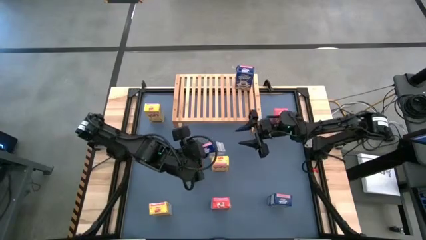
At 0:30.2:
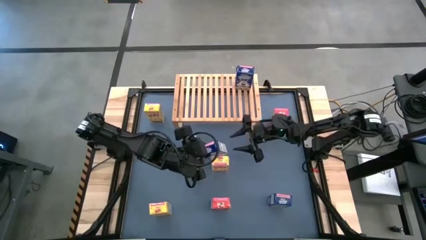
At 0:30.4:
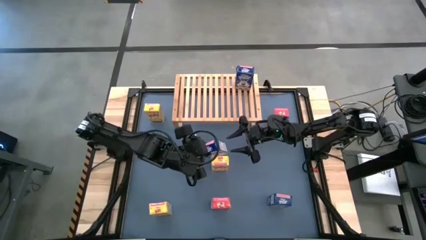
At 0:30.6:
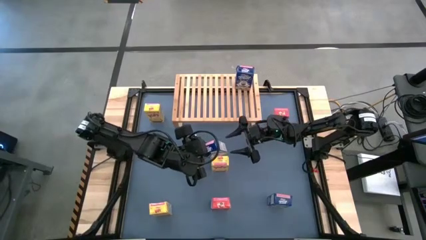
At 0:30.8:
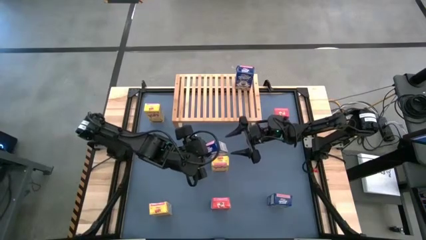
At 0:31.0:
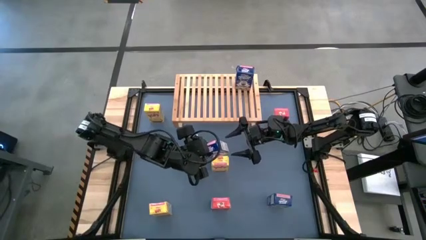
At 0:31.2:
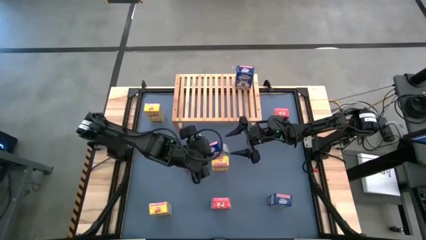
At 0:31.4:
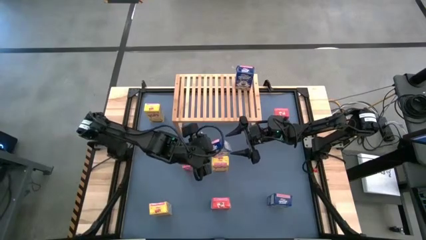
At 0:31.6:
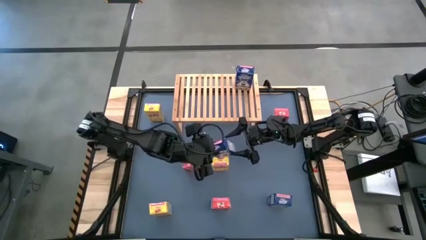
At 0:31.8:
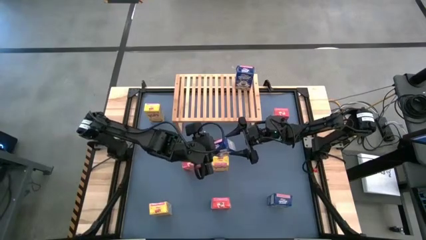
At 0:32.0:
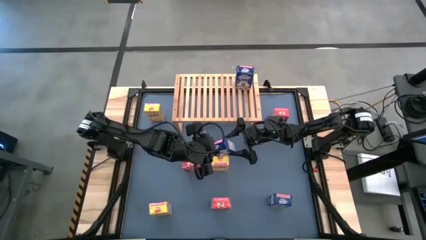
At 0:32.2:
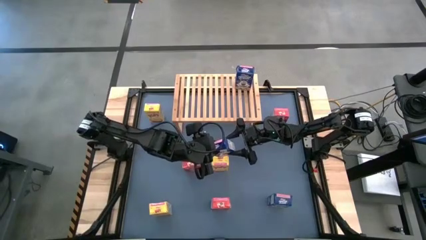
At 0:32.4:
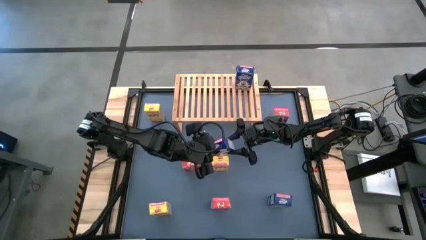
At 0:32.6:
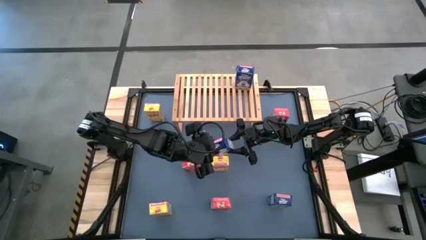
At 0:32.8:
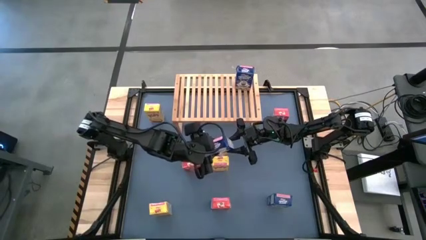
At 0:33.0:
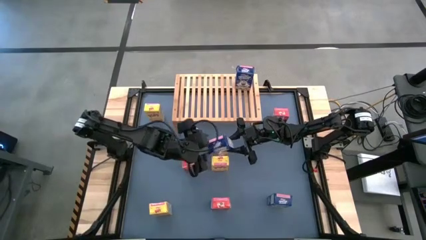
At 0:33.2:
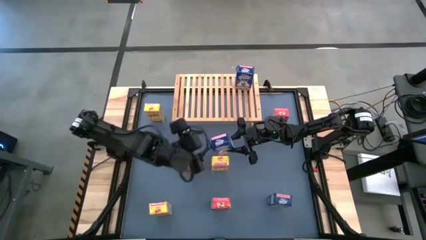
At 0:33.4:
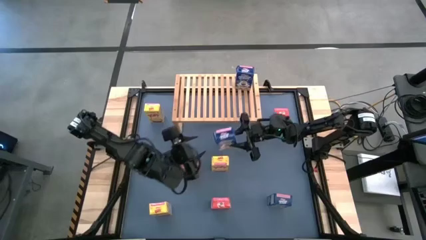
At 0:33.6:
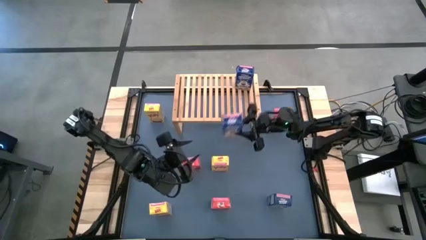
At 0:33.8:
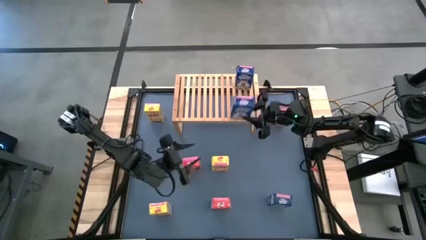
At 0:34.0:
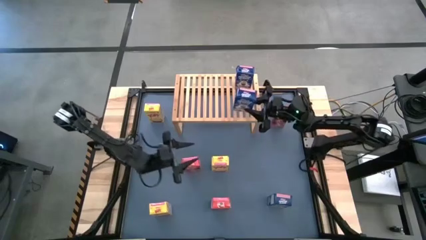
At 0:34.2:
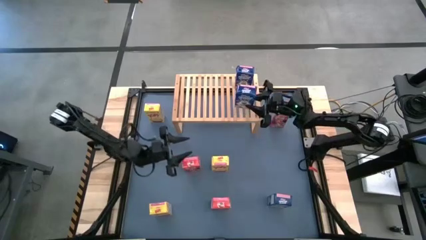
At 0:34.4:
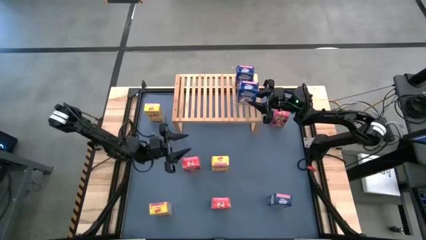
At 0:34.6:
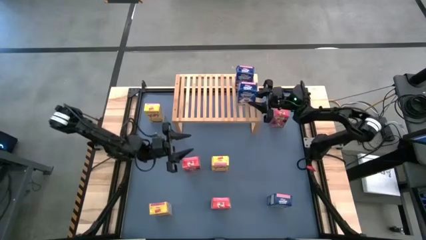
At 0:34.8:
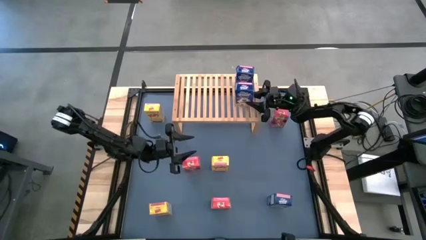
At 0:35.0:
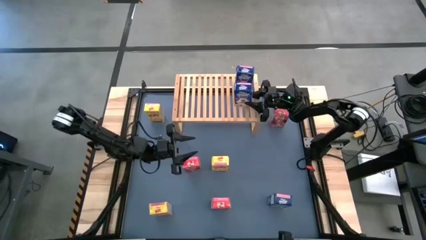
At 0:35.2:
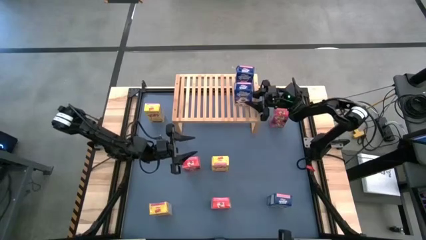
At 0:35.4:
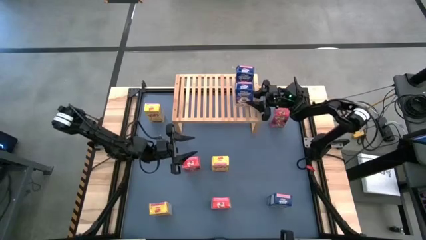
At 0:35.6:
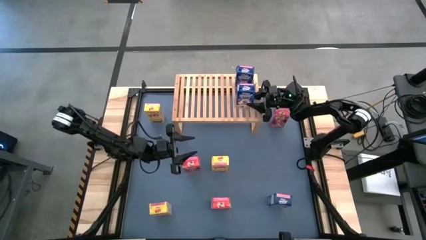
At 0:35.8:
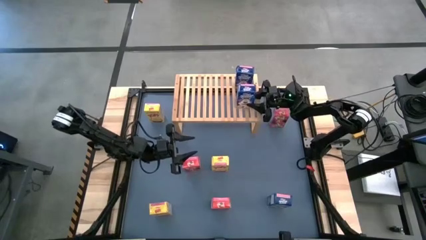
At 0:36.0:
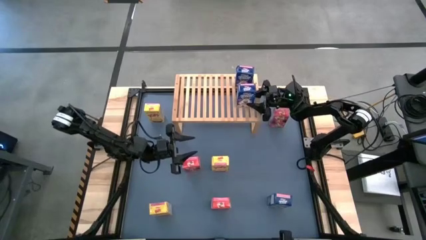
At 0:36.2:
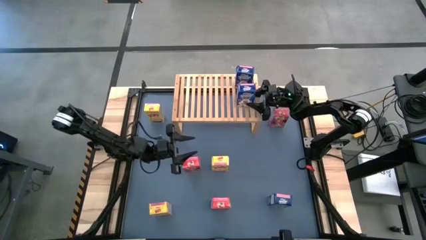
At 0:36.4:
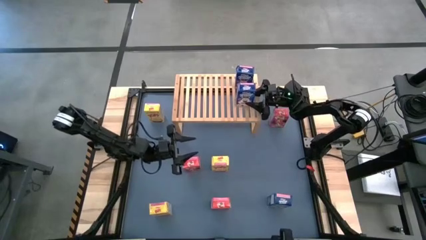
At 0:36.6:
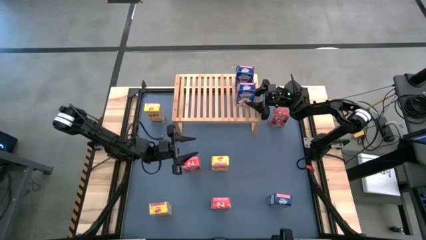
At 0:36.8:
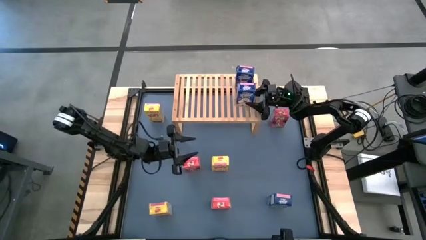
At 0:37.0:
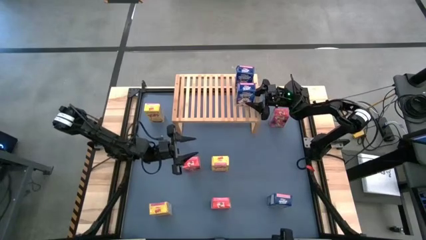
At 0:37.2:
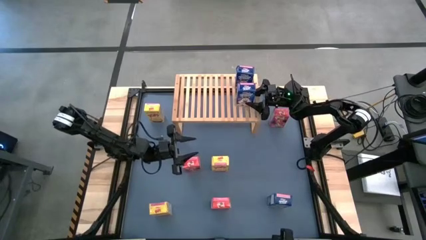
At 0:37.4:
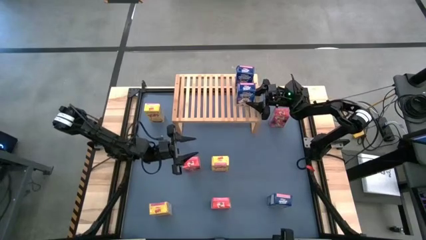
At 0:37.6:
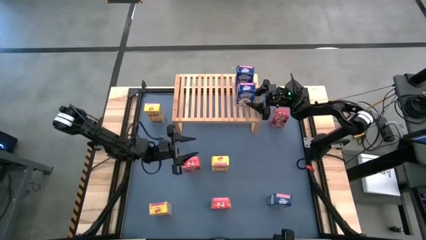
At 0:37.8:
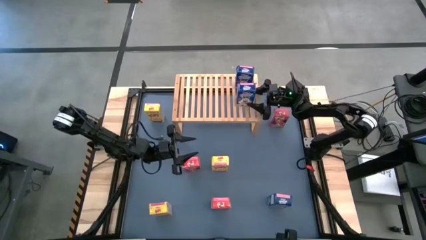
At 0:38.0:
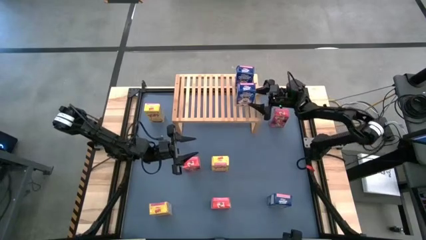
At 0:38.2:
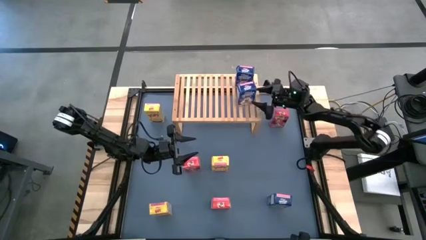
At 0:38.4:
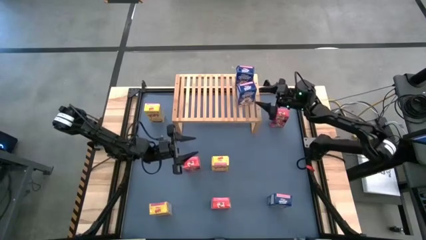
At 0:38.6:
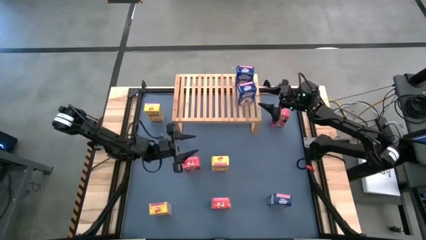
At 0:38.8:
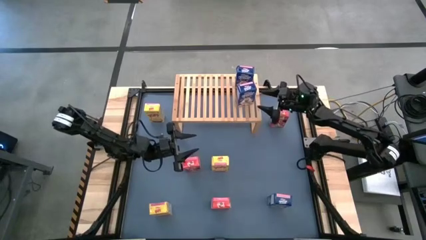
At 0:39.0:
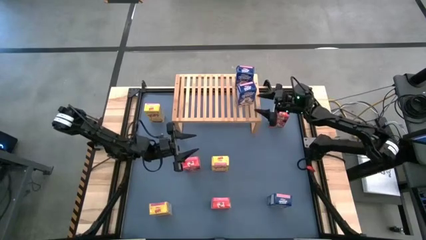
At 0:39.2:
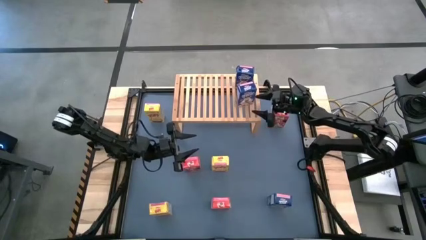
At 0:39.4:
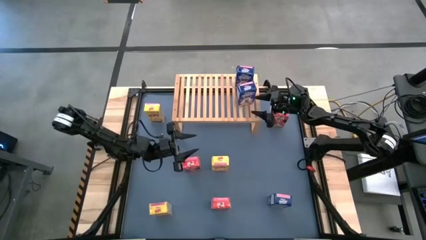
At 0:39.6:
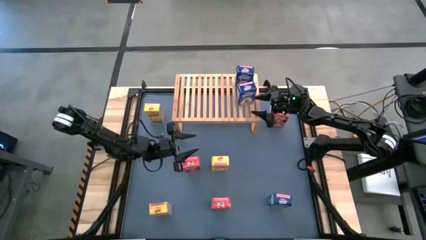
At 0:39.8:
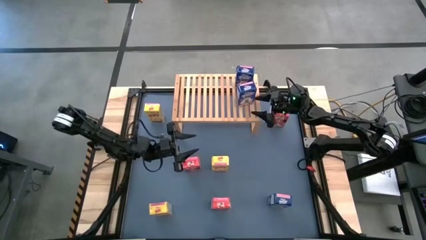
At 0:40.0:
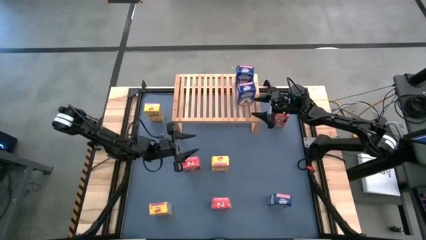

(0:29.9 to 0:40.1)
Task: Stack cereal on shelf
Put the left blue cereal box on the shelf aligned with the other blue cereal box

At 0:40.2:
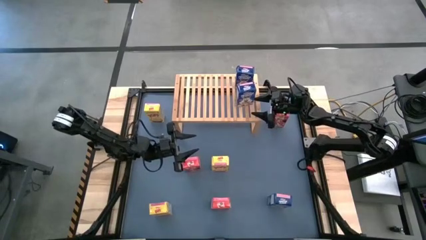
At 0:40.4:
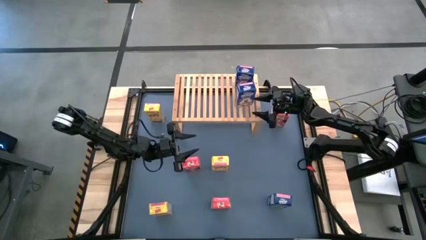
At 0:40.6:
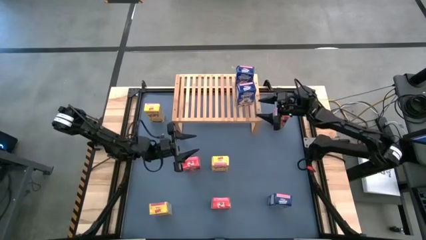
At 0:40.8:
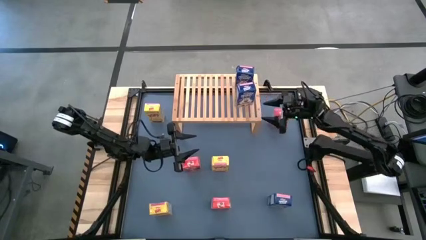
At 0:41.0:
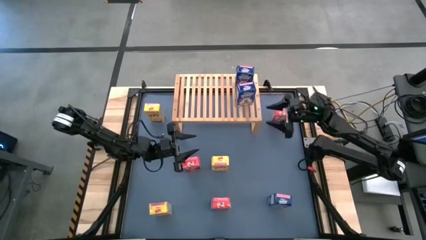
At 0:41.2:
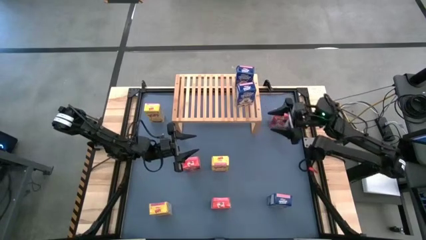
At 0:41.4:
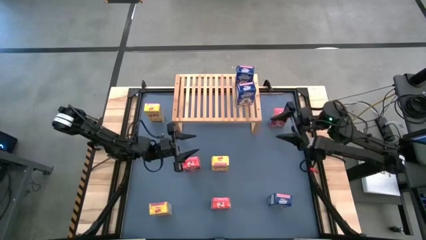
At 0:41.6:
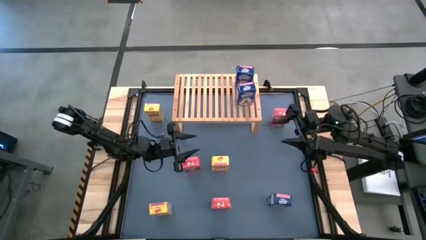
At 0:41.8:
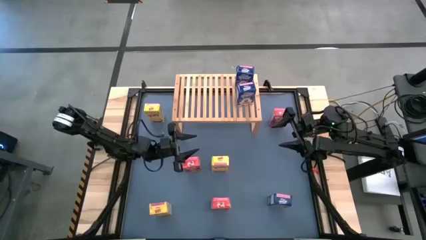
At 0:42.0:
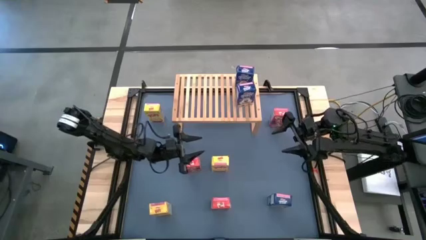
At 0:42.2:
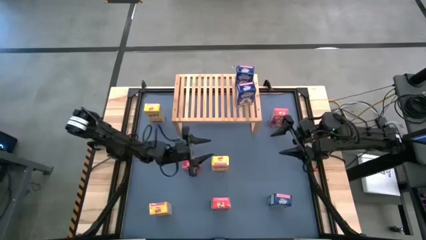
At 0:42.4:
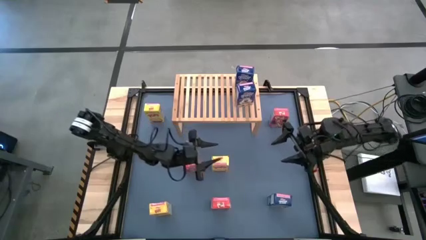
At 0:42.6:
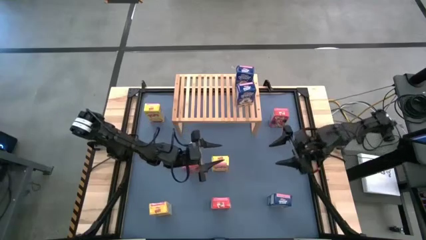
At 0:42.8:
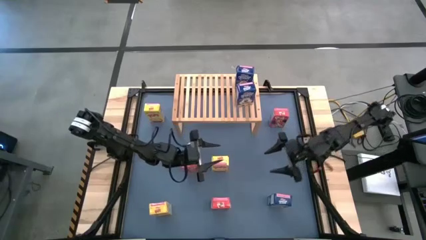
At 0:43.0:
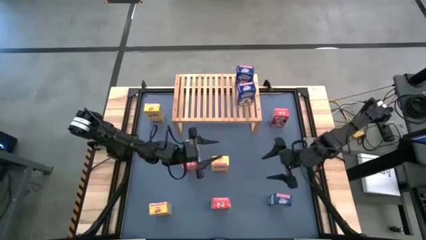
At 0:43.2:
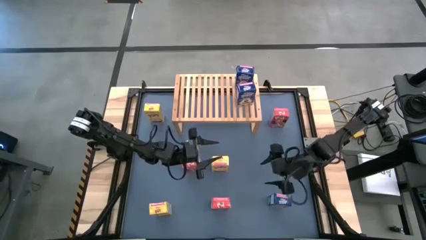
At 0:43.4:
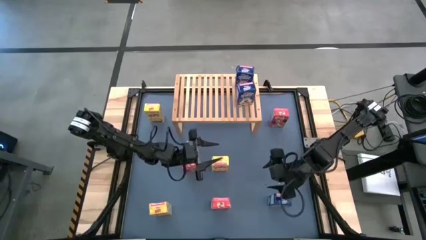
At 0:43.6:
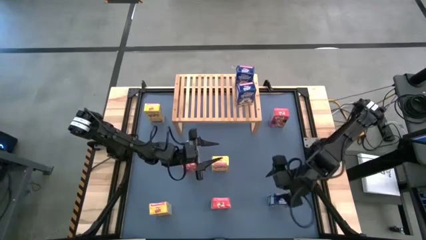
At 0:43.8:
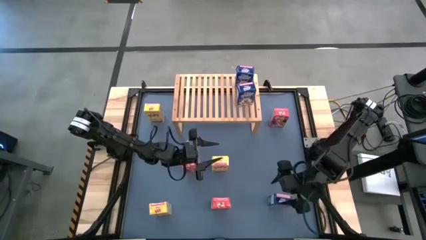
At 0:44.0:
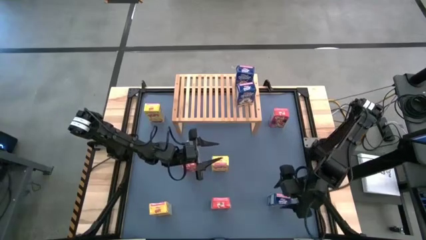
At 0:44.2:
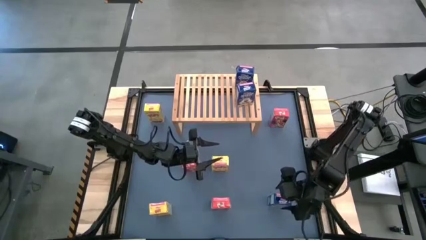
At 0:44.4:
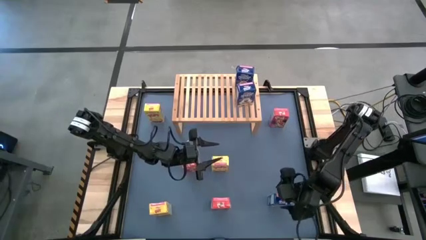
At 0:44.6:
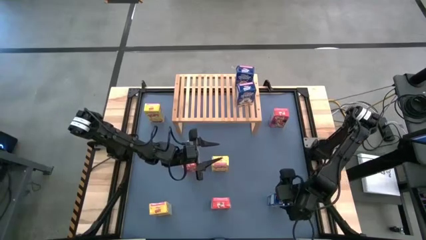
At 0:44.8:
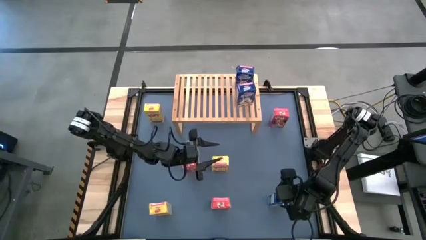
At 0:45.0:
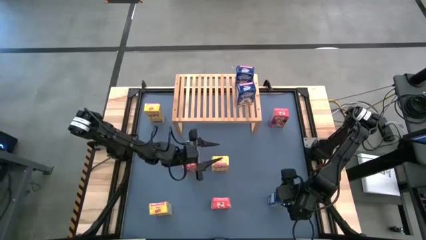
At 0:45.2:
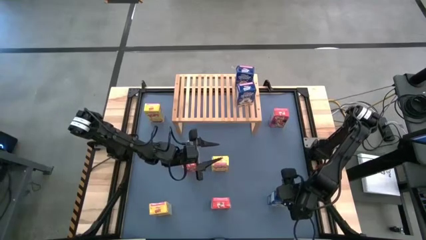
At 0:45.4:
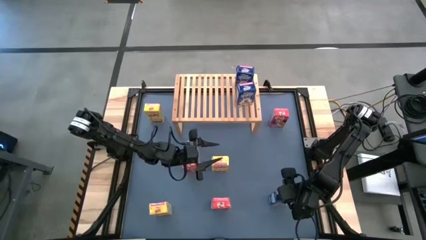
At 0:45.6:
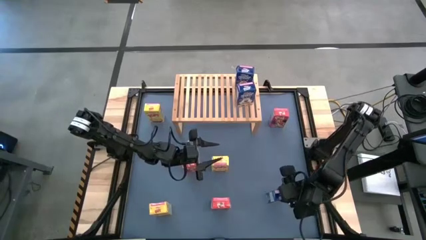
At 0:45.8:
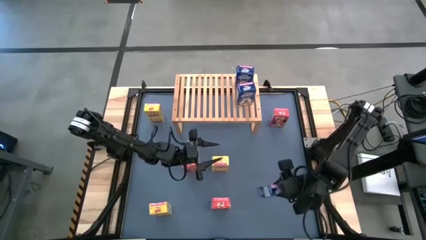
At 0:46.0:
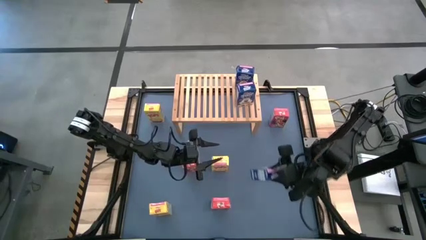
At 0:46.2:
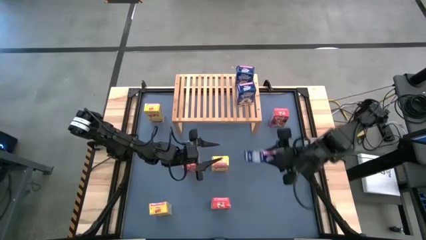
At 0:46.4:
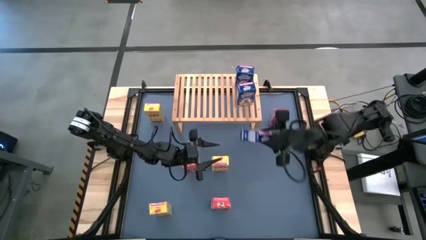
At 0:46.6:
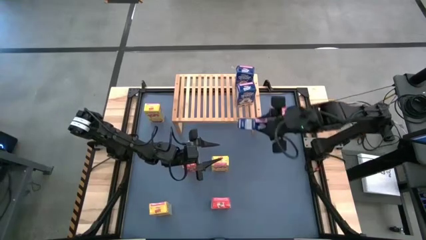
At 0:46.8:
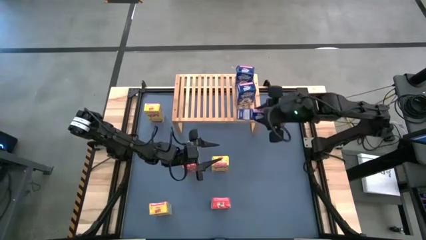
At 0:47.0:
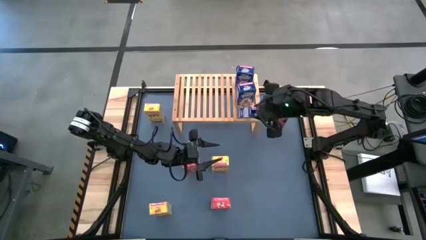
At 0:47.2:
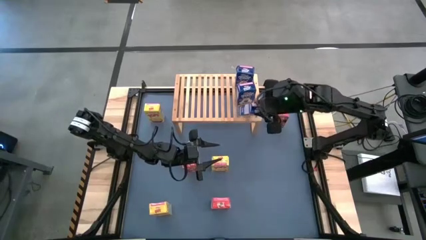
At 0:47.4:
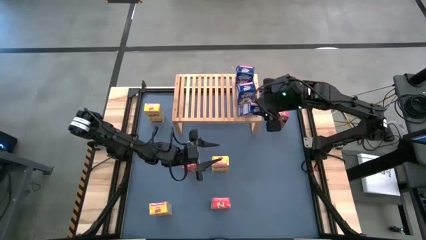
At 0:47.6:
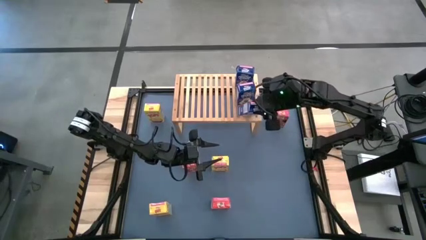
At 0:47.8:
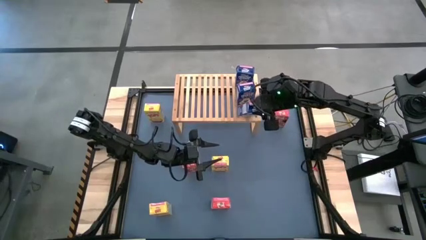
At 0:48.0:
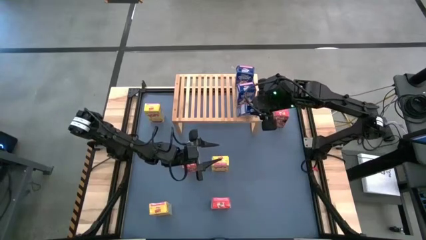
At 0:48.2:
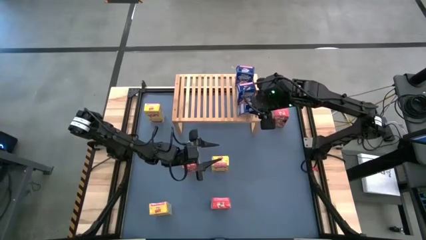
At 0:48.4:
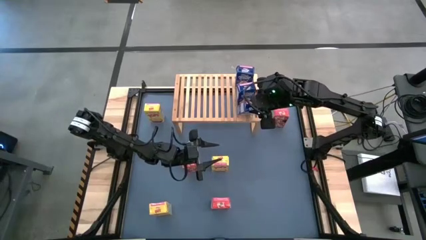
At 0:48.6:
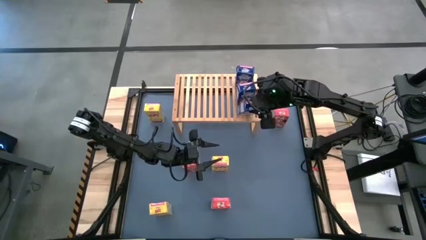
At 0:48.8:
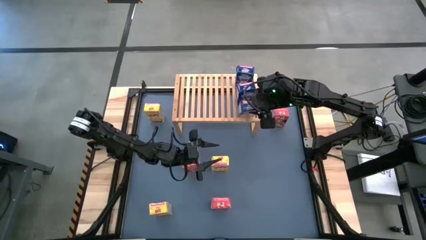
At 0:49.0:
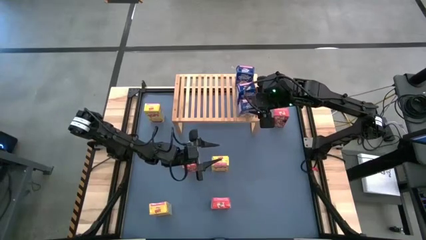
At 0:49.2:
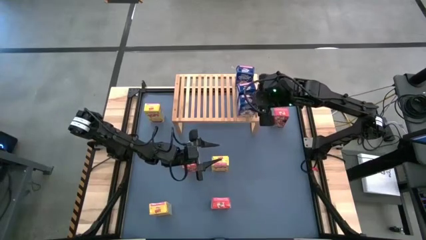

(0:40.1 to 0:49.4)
Put the blue cereal box on the shelf aligned with the other cereal box
